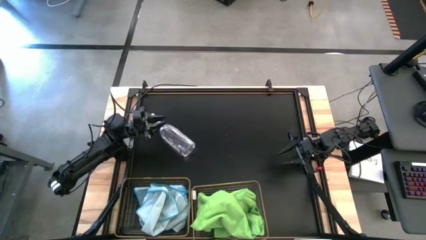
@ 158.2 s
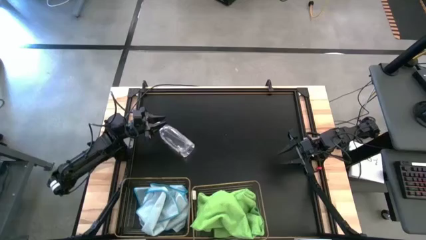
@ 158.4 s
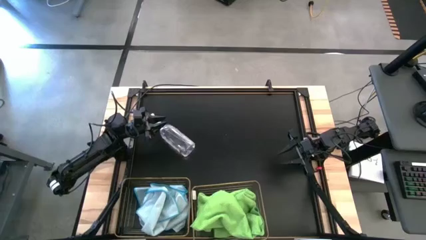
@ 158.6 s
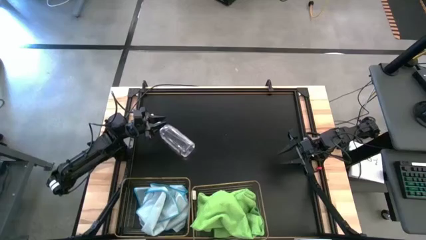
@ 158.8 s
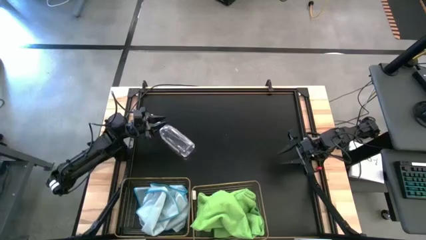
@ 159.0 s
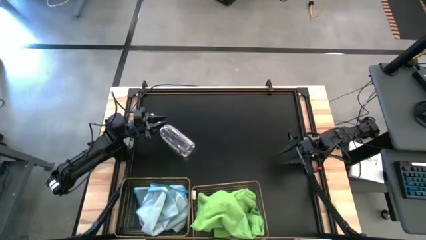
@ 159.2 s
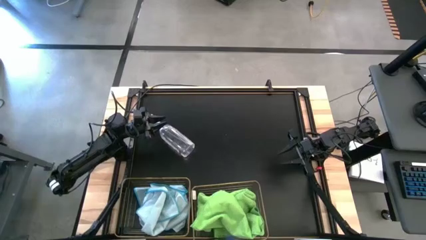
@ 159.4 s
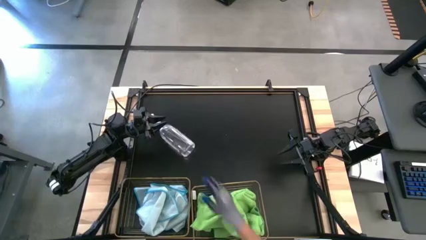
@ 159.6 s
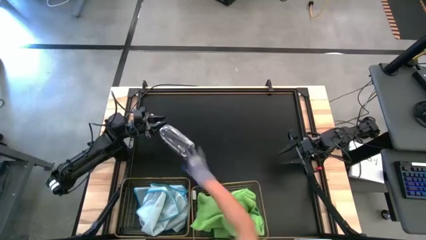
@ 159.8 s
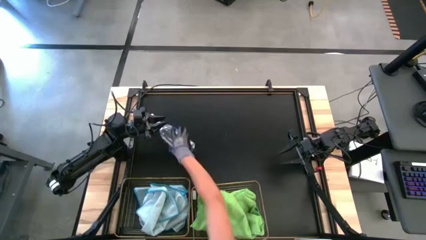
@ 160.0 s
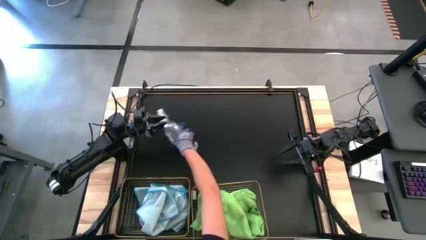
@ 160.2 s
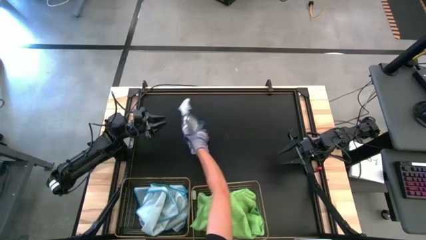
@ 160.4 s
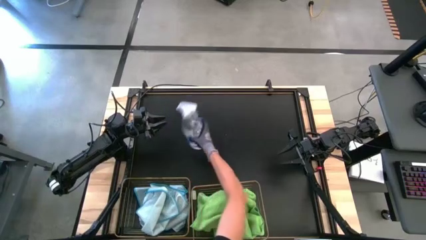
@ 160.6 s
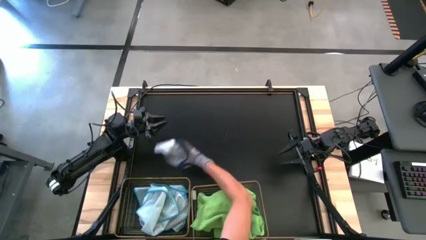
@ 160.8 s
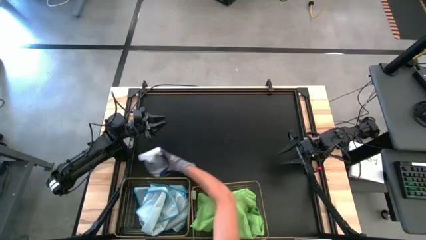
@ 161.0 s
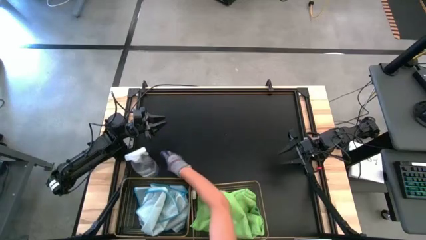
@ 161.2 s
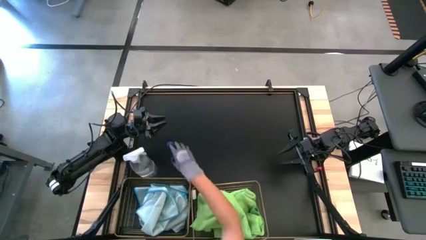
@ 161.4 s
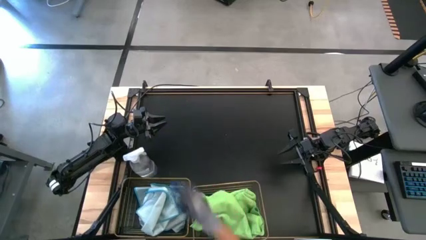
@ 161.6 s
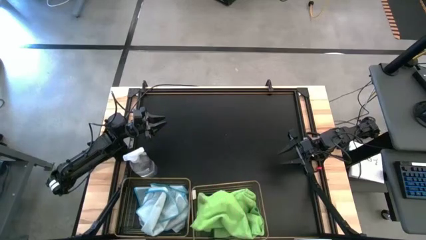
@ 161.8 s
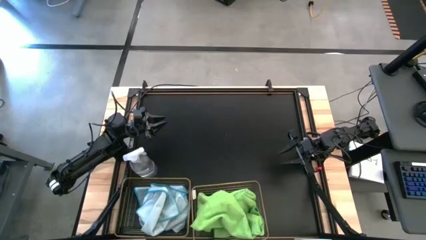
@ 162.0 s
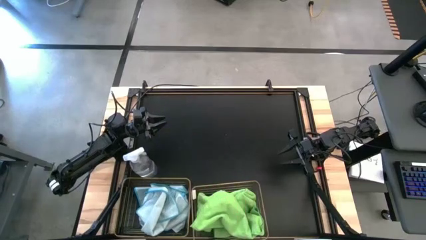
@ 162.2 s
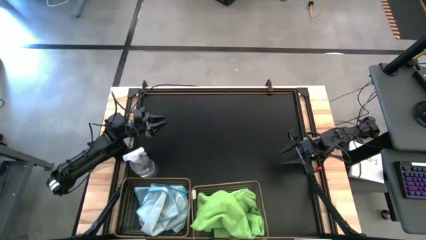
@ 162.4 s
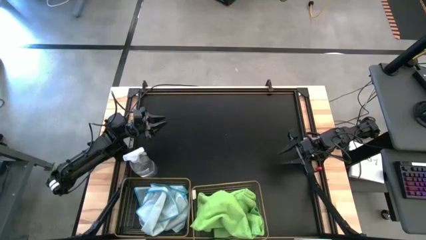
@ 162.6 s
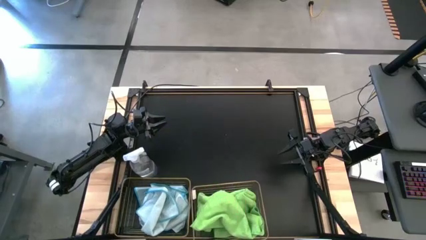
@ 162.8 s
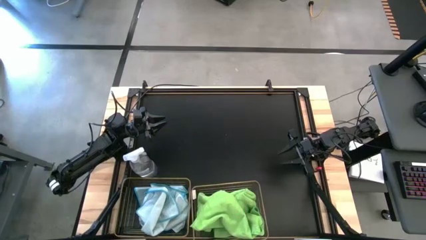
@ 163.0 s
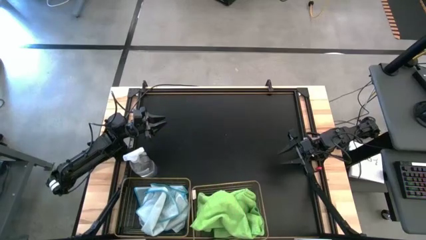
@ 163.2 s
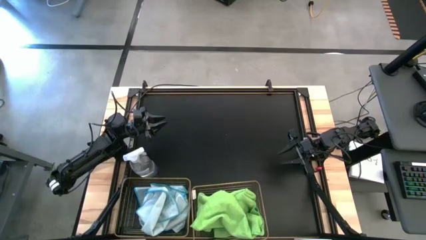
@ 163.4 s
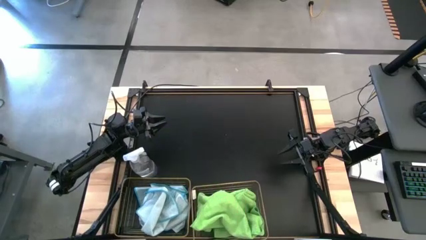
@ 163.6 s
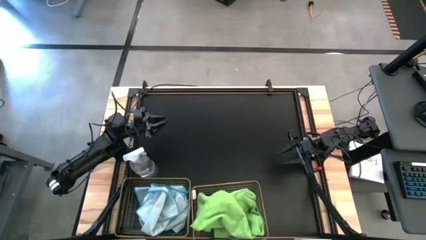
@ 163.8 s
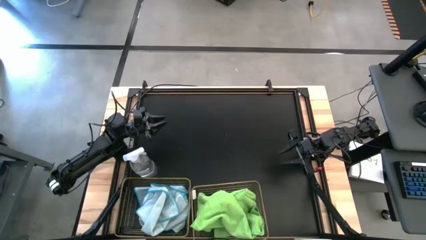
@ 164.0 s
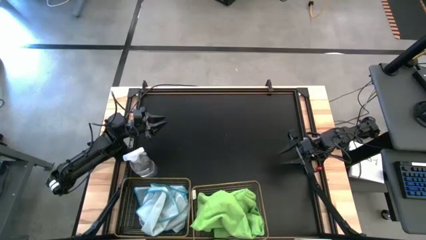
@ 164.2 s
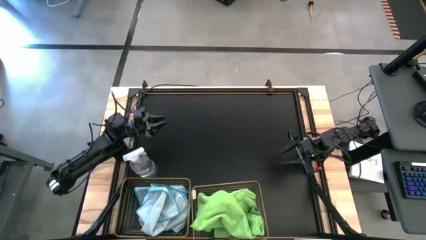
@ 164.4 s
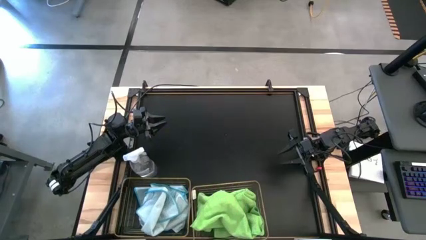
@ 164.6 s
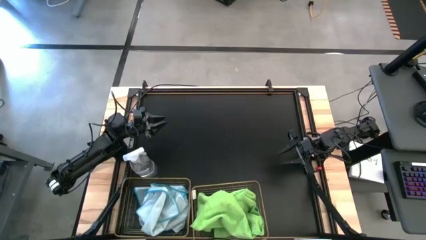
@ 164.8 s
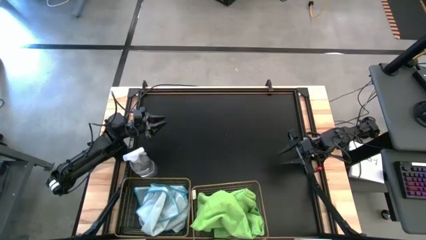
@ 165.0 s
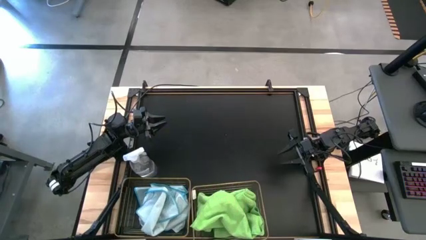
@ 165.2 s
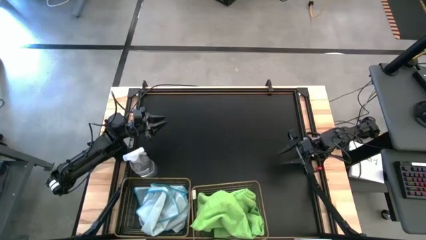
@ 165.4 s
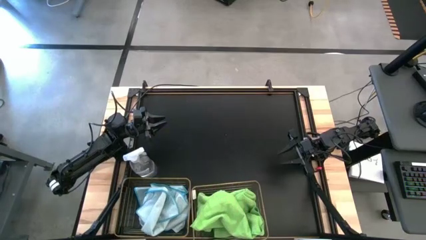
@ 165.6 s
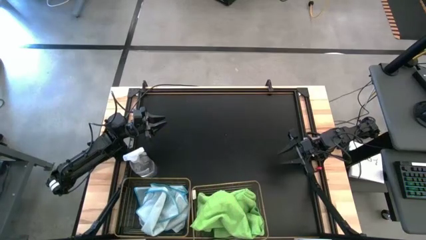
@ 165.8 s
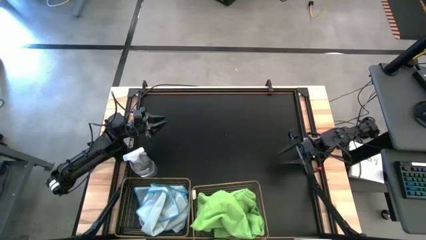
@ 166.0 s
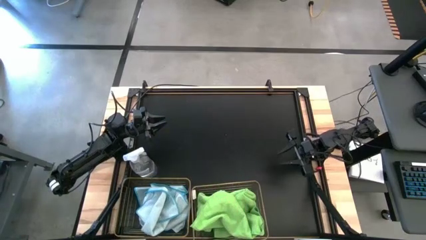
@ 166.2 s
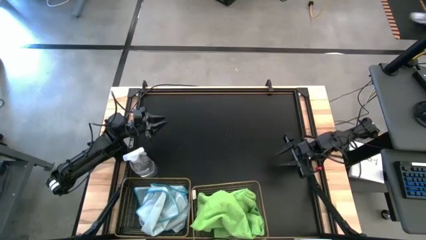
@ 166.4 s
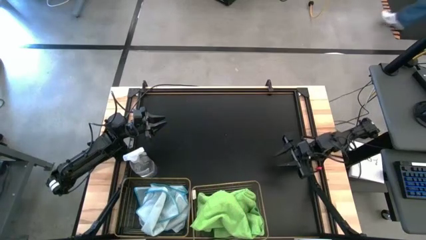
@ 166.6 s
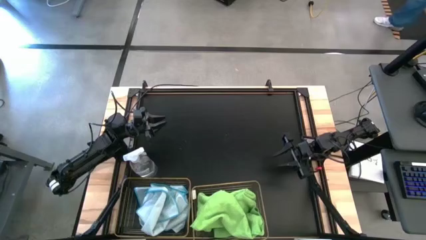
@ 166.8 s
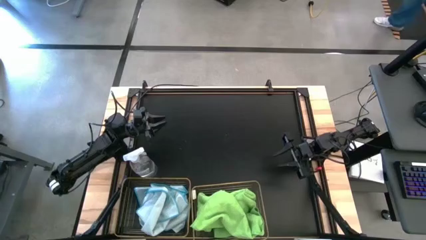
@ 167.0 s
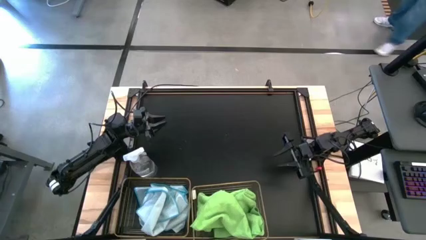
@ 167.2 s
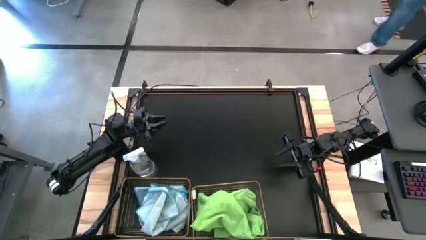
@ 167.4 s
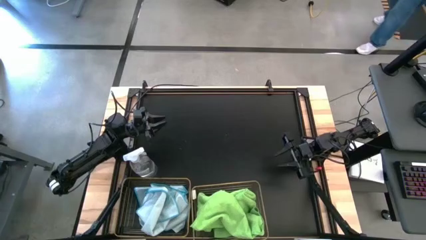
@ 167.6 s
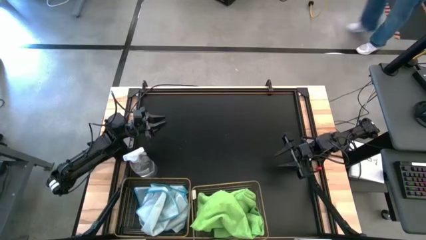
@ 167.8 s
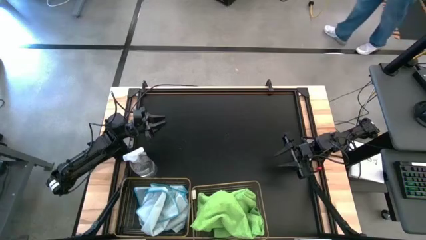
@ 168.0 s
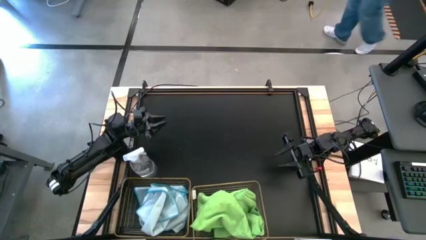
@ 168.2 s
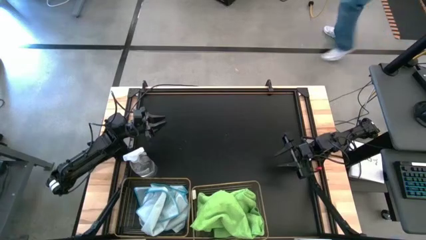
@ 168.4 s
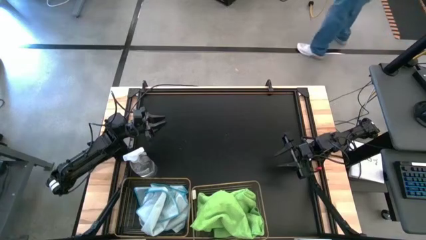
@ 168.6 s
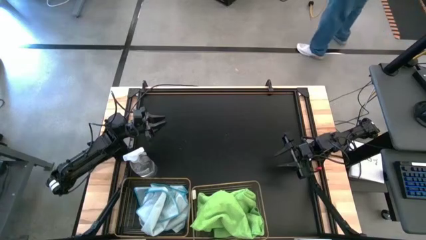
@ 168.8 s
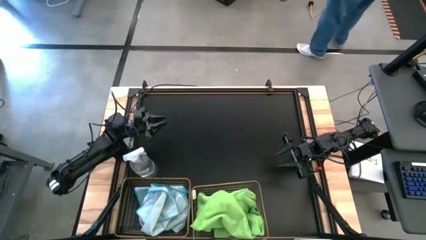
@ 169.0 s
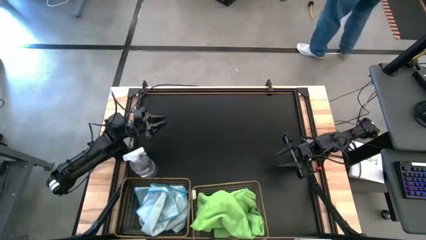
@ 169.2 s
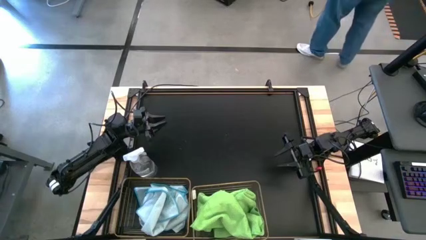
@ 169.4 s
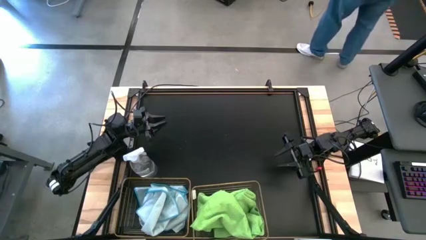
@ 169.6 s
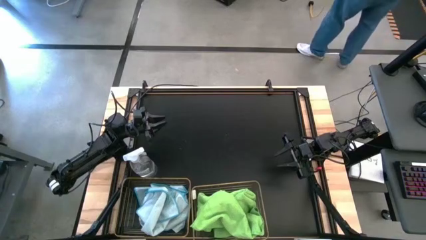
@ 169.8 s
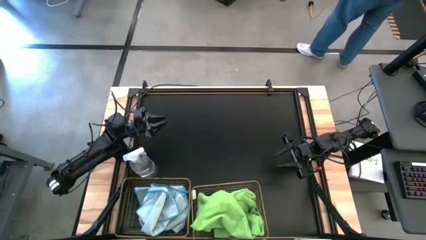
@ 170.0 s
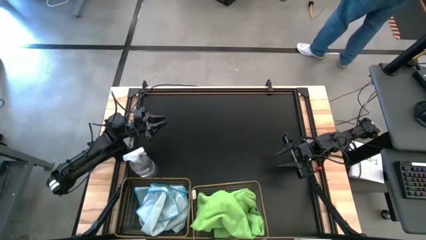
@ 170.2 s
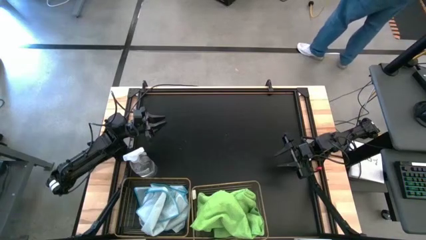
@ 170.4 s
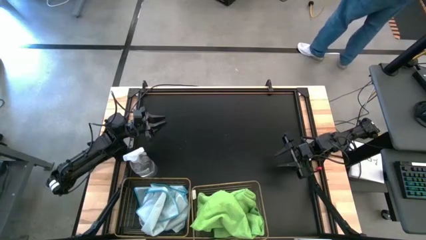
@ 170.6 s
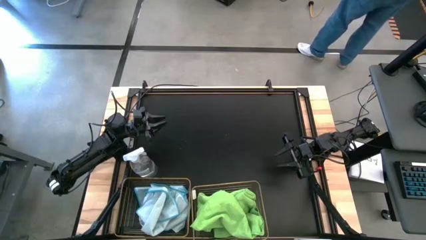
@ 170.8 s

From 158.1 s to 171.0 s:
Task: Sort microfiber towel by color & place in baskets
Return to Home Position

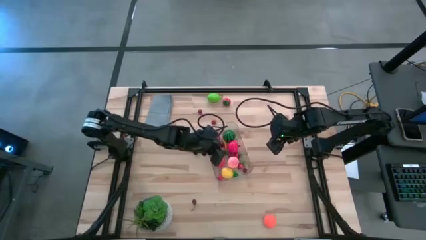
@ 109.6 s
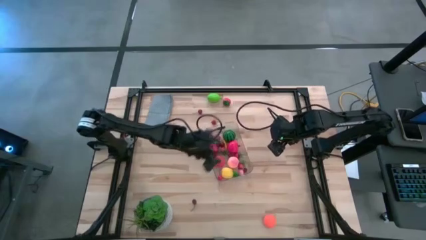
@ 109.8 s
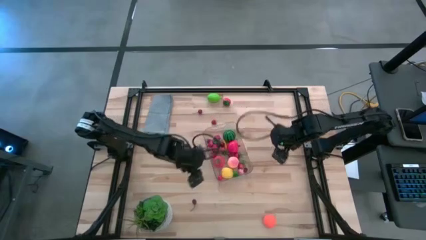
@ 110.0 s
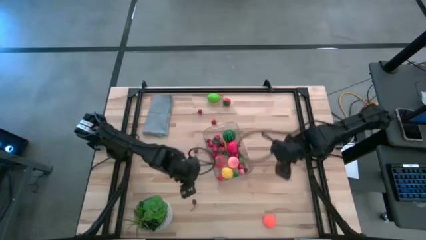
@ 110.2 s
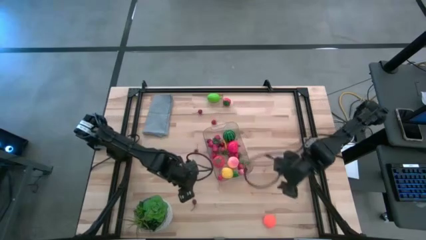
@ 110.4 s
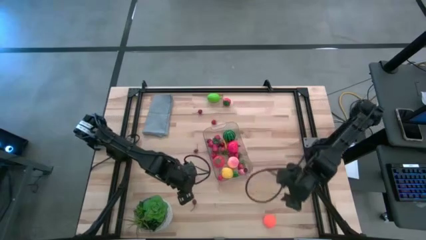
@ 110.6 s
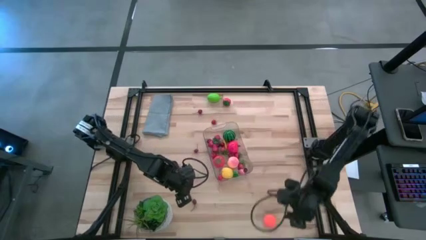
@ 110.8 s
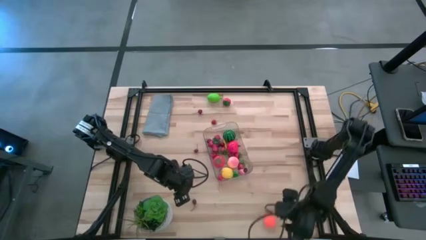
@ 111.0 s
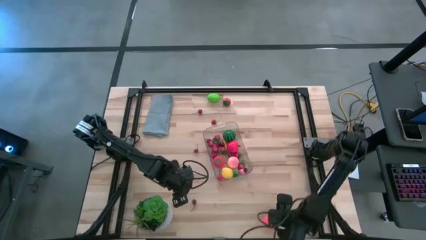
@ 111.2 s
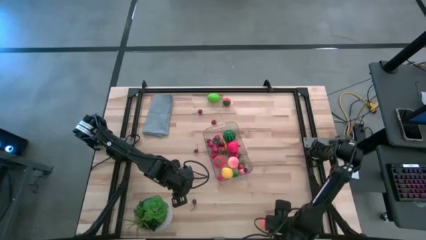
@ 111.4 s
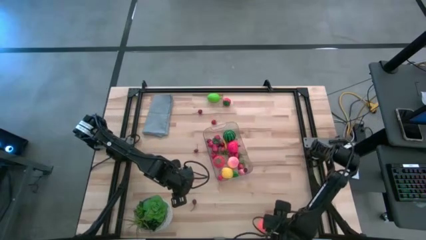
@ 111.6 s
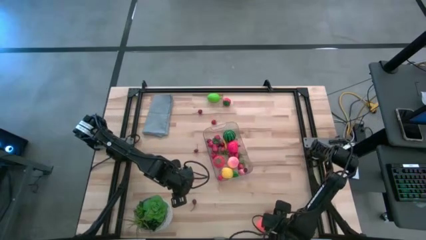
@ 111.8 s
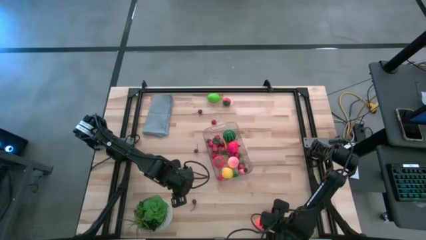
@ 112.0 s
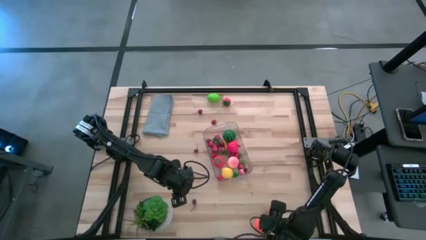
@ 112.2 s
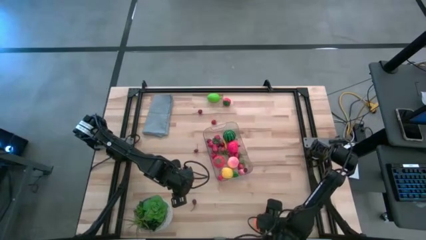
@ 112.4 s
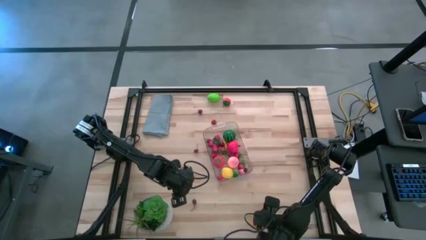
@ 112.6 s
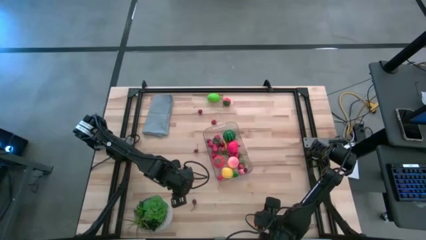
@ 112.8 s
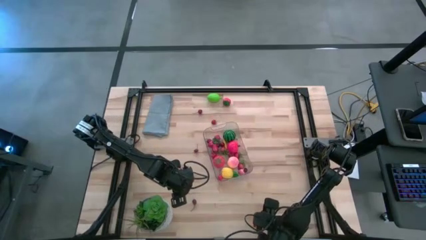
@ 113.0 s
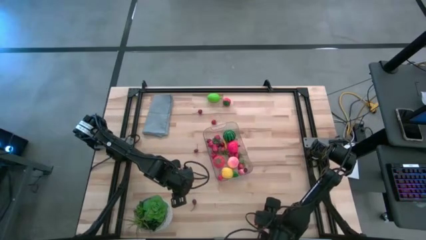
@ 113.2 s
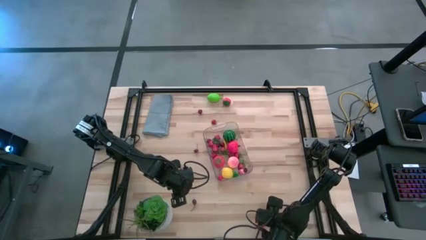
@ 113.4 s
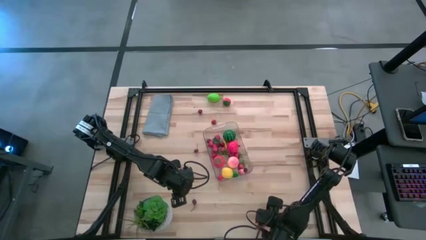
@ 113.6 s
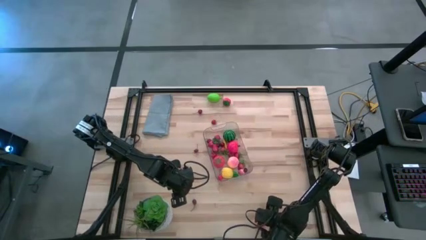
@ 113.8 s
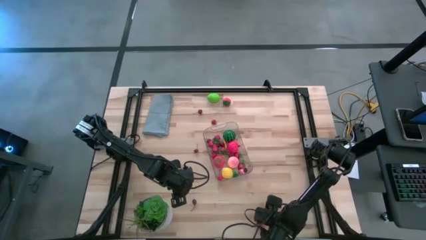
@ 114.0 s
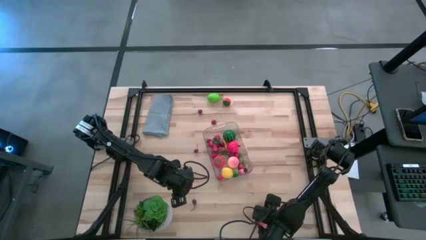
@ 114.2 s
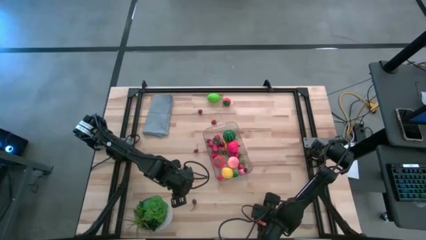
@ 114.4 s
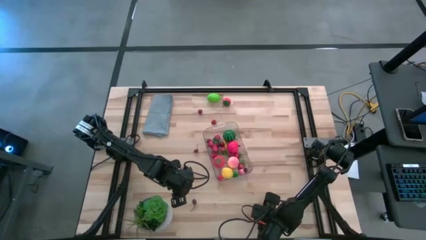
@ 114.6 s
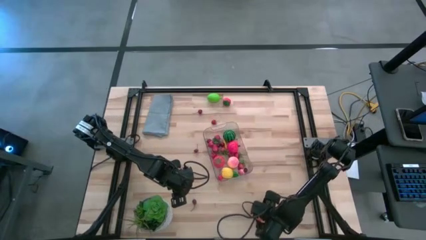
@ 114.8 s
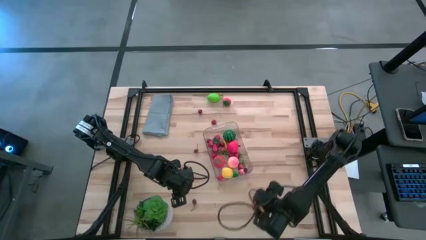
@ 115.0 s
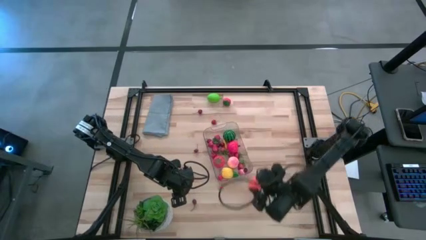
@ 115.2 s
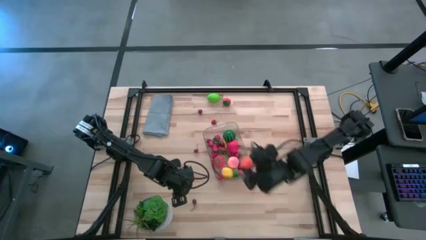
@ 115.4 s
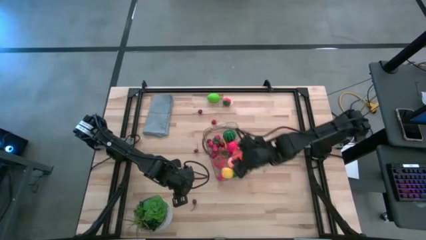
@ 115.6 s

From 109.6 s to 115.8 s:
Task: Pick and placing Produce into tupperware
Put the orange pumpkin into the transparent bin
